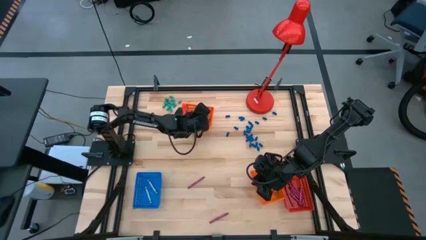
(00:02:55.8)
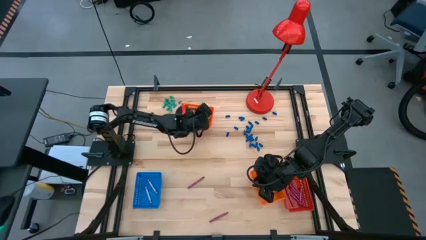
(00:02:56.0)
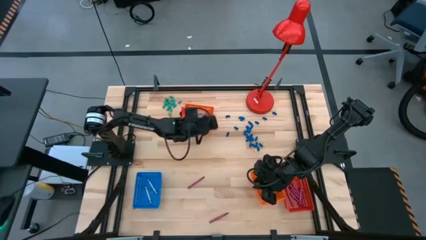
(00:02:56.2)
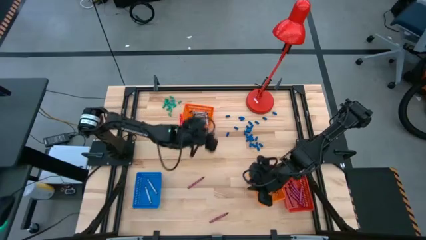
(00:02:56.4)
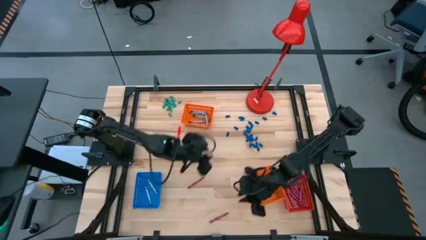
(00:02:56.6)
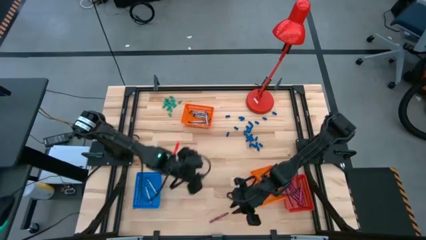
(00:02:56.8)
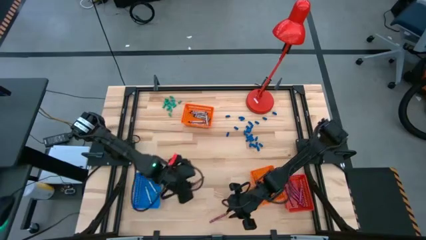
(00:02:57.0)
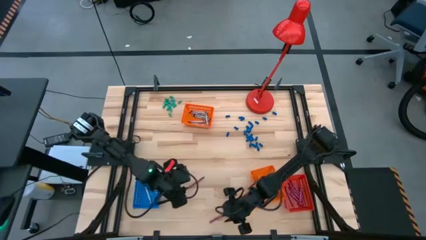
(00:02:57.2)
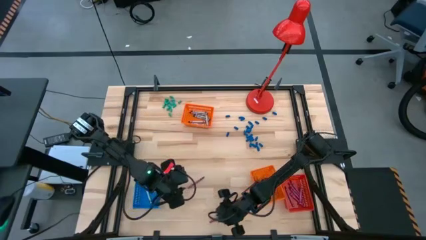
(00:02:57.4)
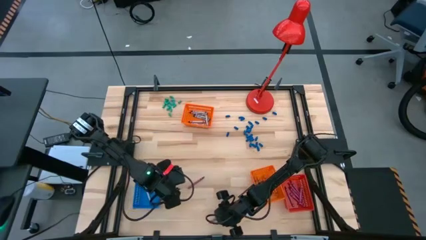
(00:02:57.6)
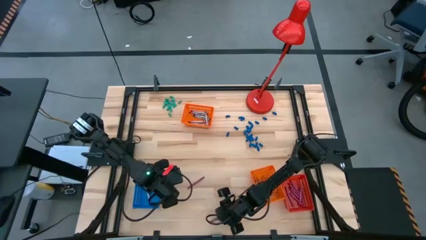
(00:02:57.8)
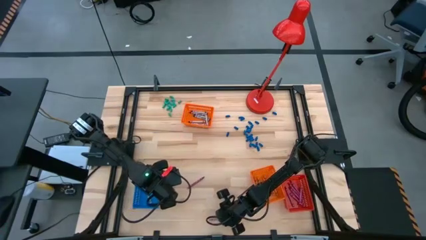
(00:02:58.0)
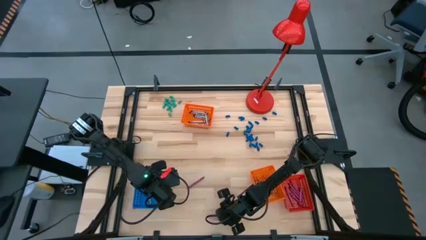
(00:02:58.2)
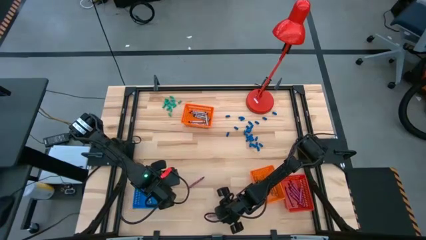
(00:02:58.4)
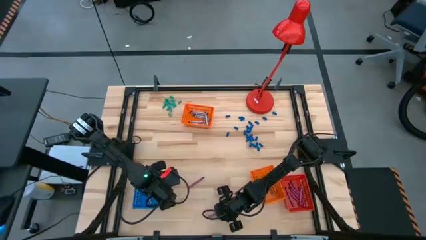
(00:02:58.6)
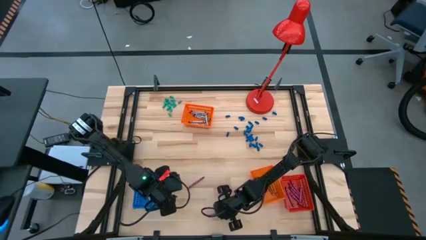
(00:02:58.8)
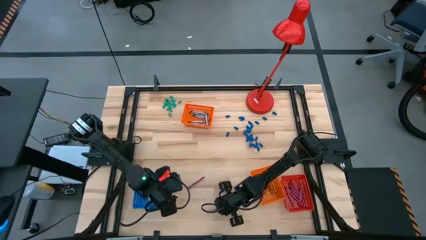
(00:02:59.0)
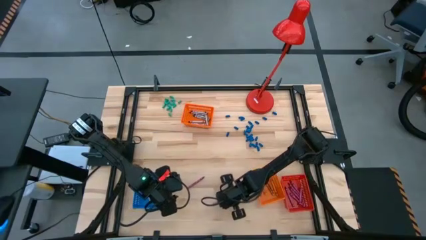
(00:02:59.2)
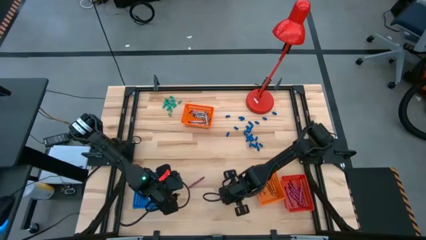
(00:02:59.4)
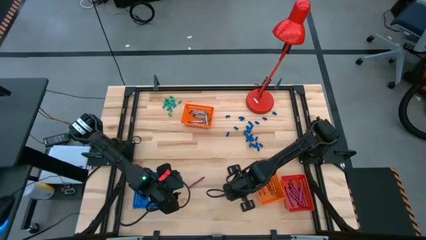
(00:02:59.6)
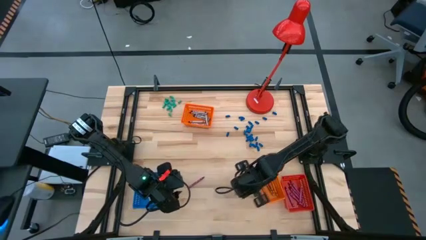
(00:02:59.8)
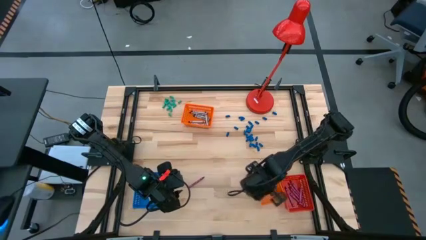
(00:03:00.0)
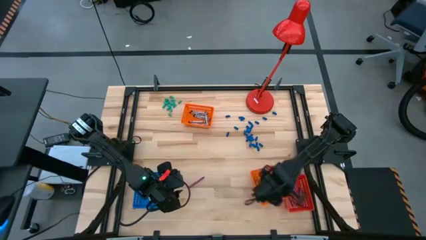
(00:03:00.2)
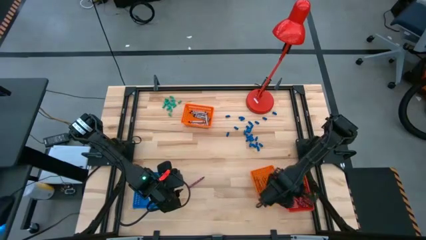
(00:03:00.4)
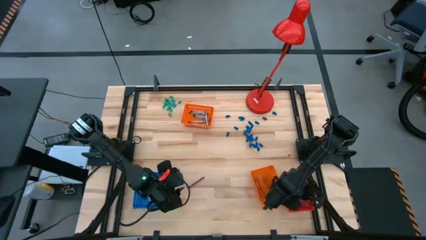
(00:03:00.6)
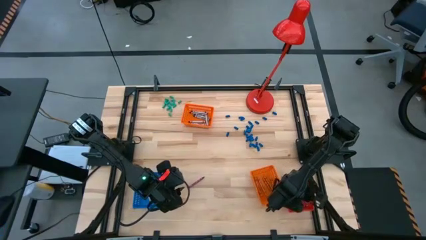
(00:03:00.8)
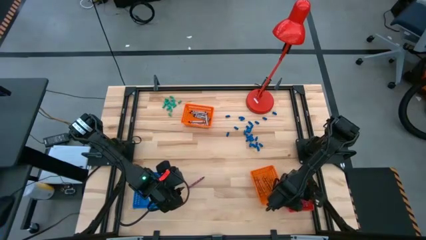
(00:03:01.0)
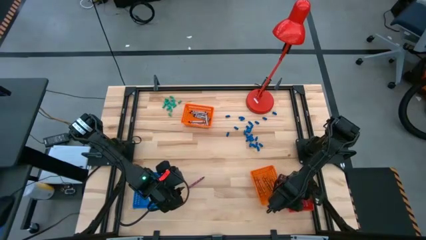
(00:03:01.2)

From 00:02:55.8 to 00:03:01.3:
Task: Sort crayons
Put the red crayon into the red bin

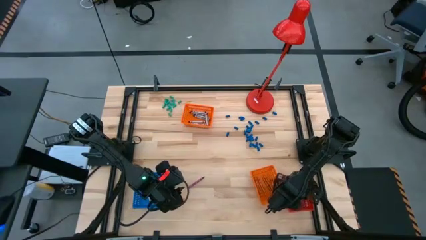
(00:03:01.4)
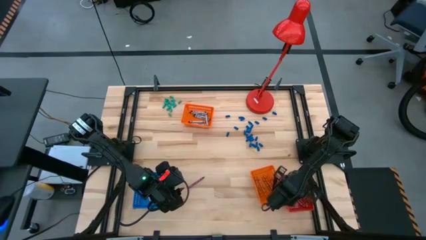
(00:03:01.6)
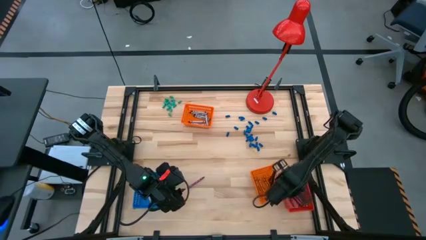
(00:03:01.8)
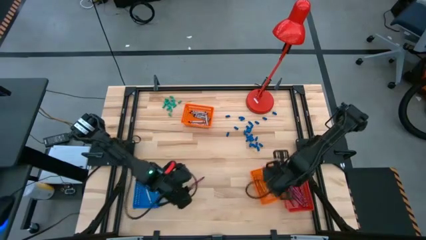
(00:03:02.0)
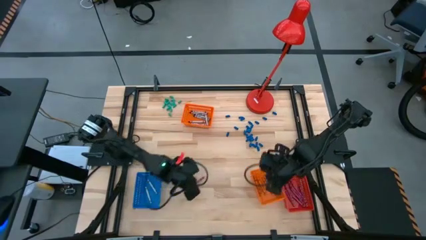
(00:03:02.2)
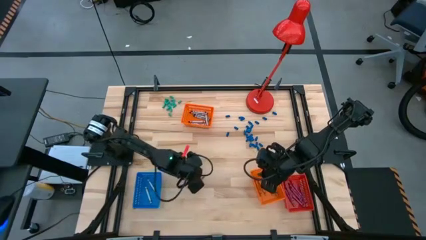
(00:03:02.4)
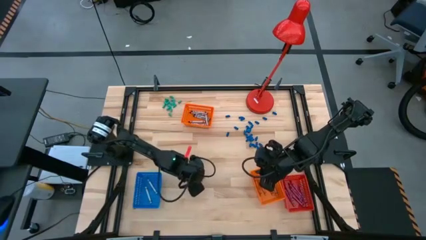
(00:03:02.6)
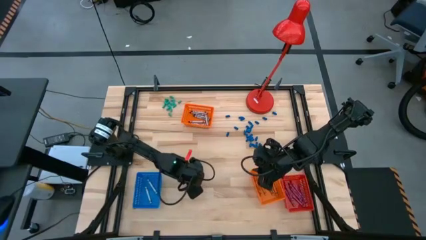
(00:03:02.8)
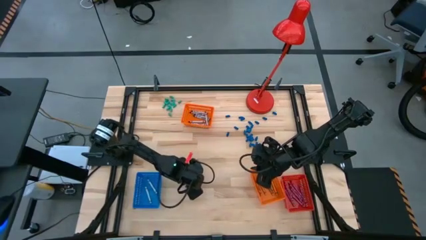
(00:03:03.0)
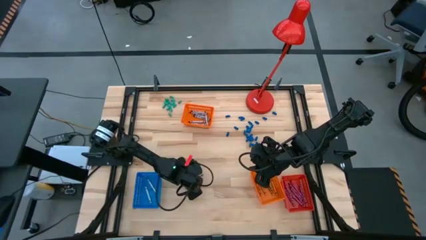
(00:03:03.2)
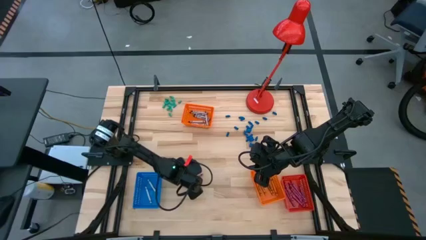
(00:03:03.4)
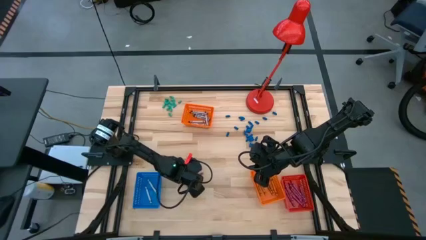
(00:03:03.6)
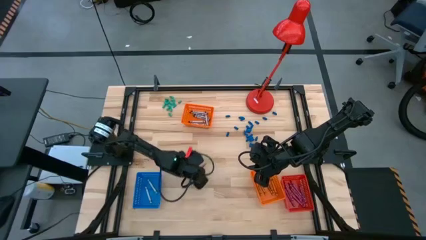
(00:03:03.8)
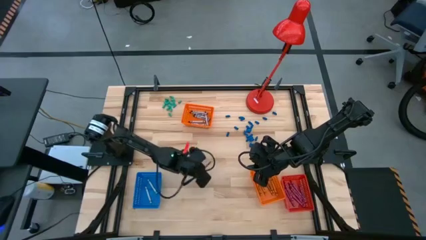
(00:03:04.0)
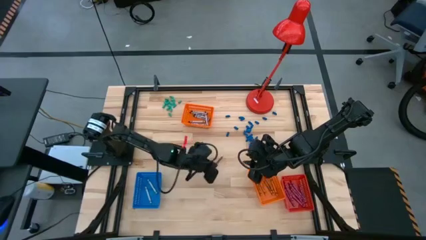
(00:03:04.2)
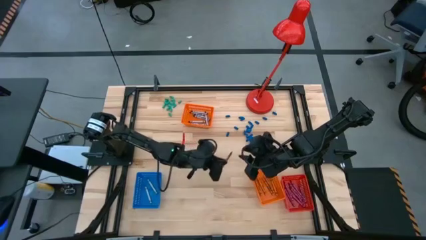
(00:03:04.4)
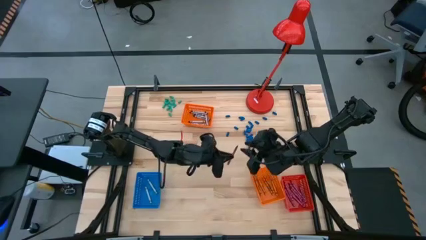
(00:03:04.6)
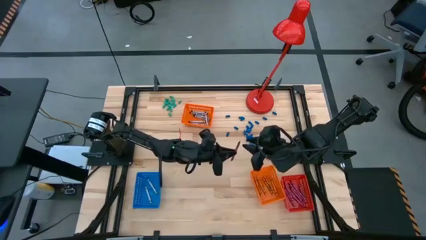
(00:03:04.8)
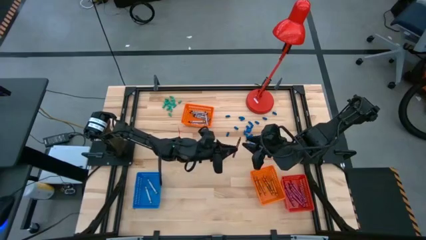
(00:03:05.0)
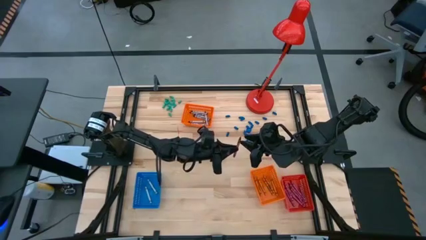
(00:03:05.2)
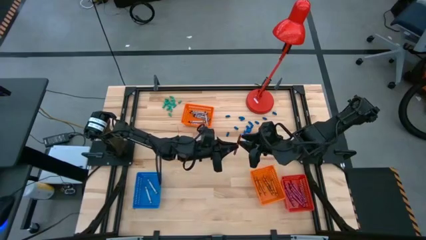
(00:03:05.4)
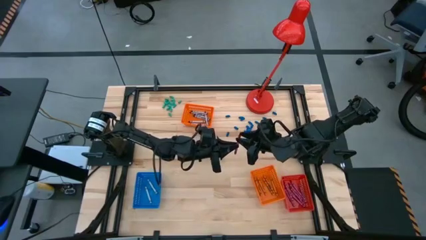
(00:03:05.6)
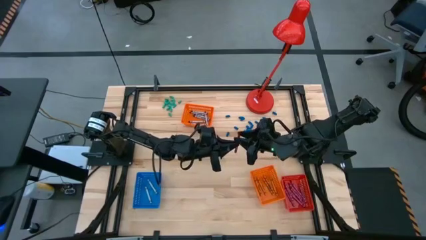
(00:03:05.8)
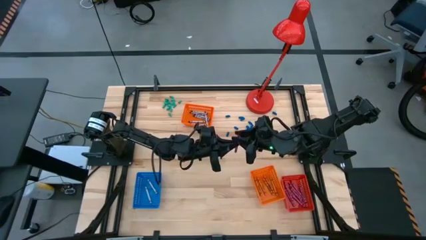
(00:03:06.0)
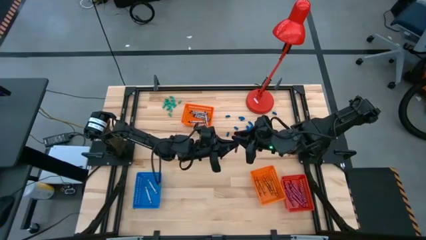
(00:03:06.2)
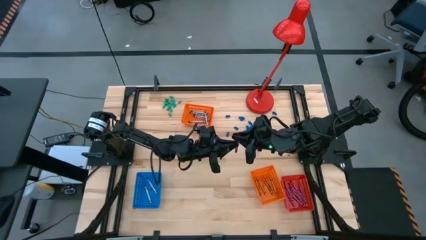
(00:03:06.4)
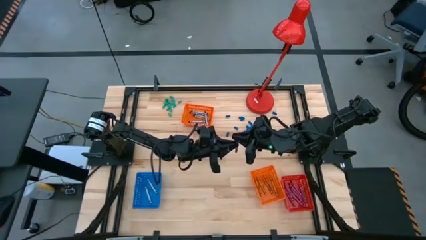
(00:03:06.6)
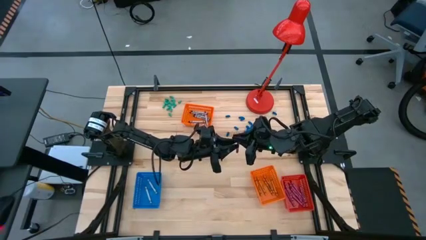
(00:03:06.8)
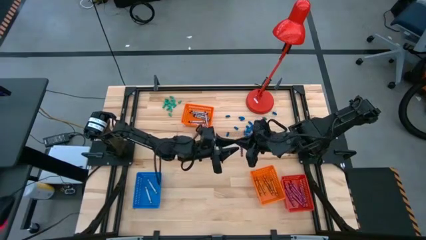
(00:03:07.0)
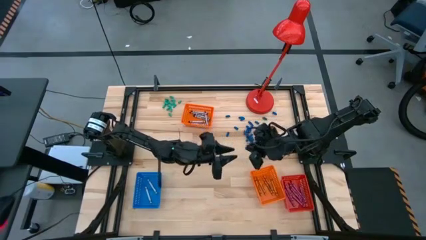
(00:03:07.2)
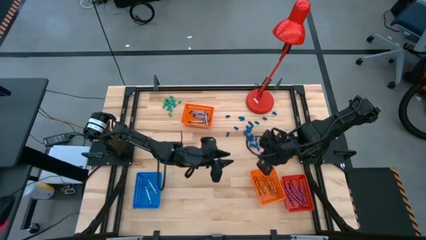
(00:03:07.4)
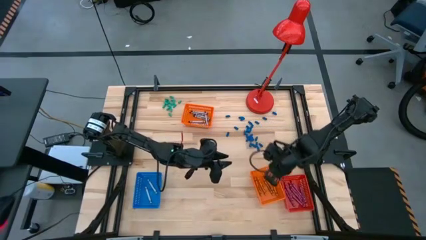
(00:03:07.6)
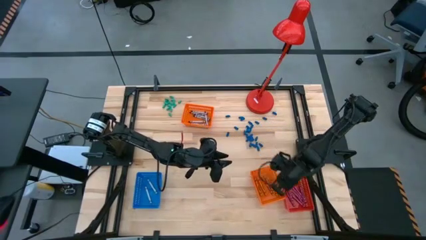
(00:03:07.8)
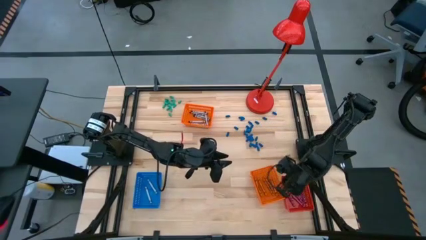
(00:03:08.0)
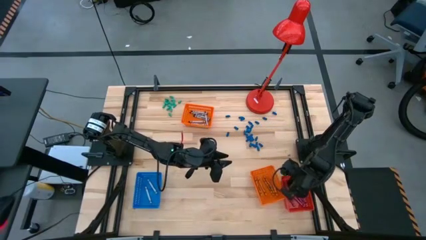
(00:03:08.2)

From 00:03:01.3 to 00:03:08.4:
Put the red crayon into the red bin
